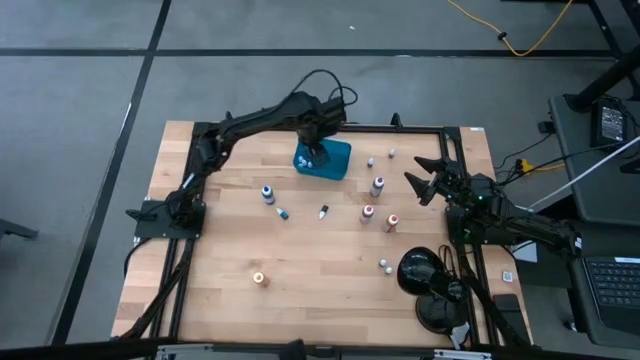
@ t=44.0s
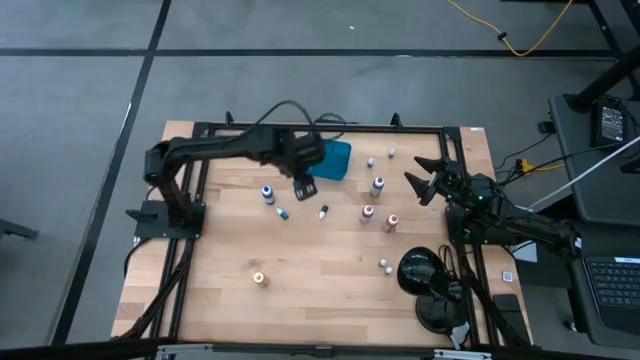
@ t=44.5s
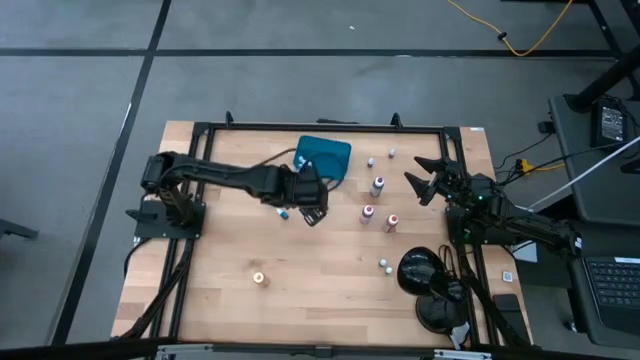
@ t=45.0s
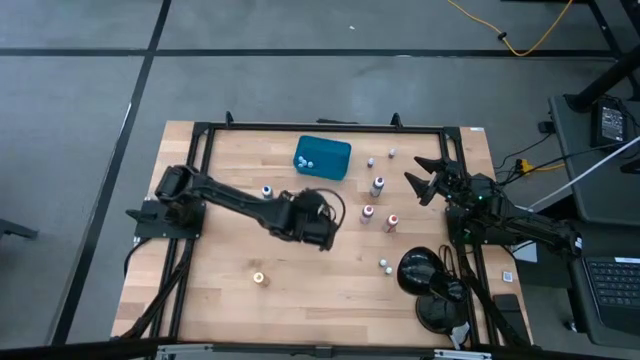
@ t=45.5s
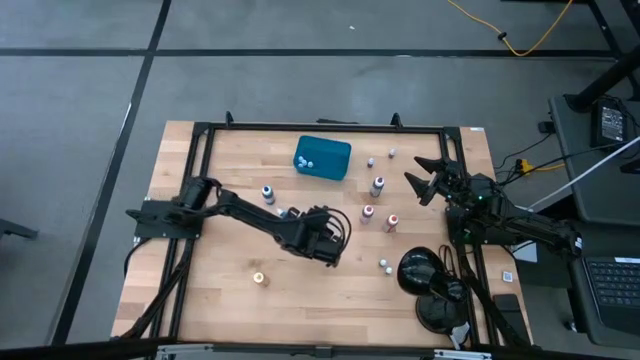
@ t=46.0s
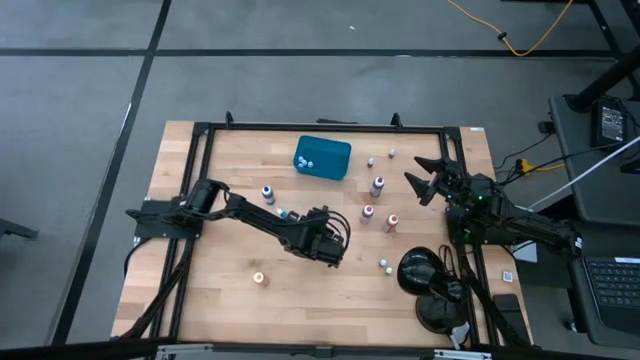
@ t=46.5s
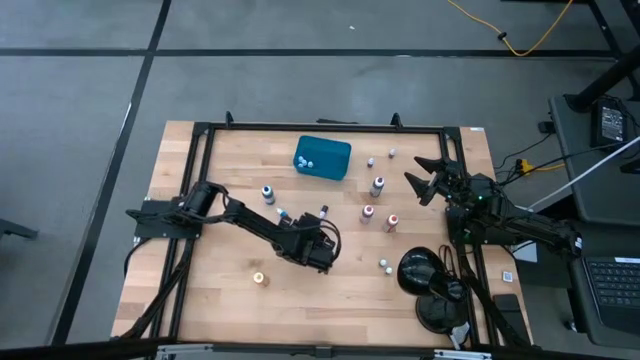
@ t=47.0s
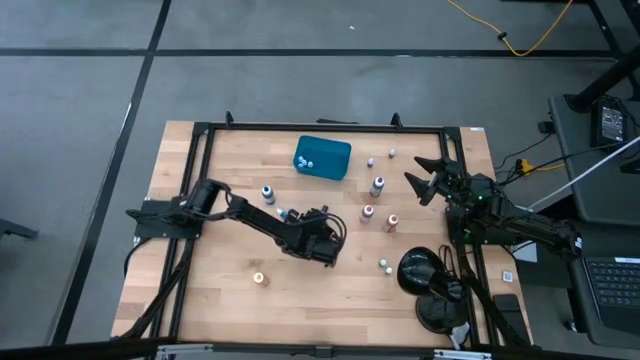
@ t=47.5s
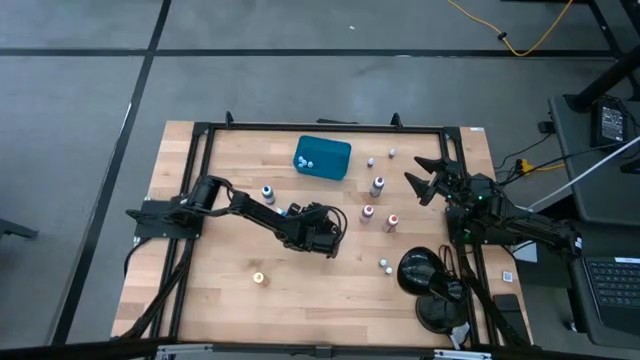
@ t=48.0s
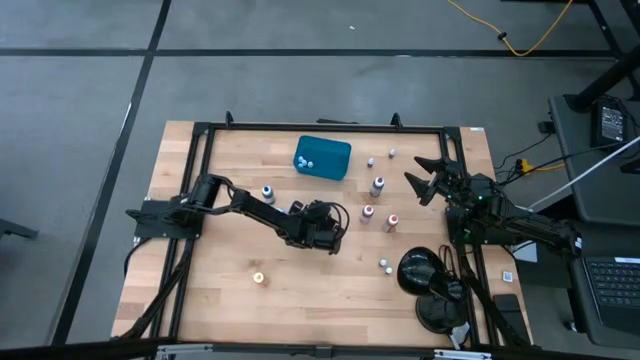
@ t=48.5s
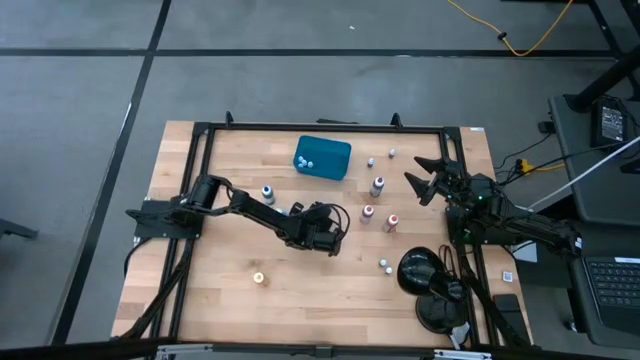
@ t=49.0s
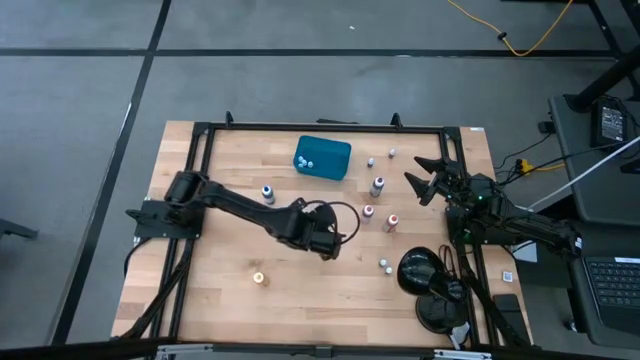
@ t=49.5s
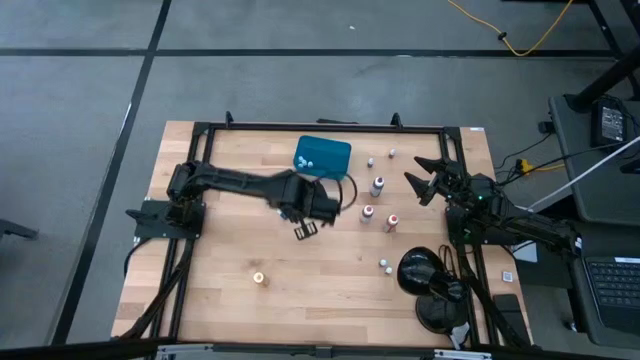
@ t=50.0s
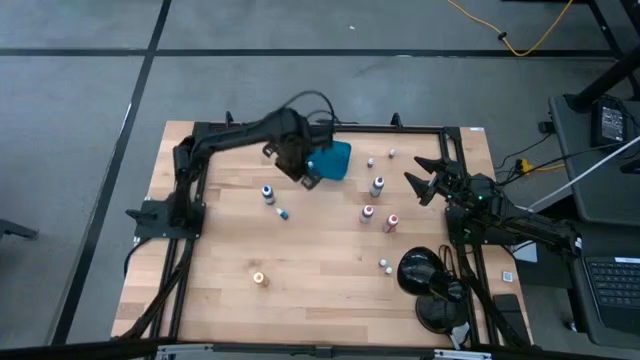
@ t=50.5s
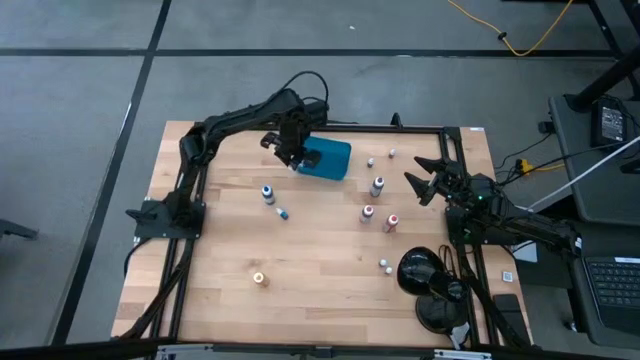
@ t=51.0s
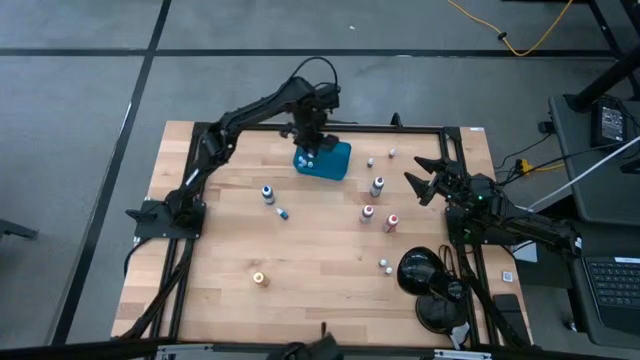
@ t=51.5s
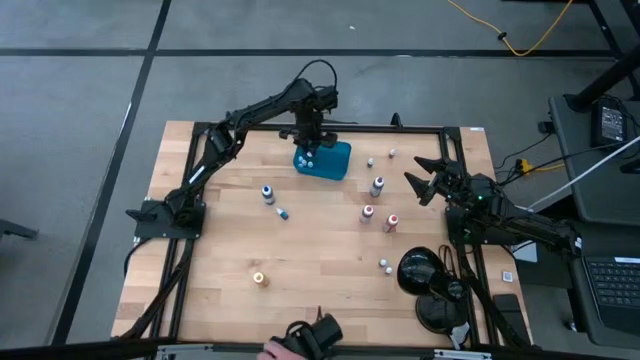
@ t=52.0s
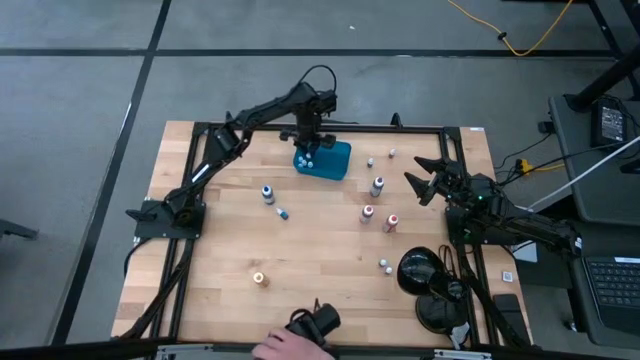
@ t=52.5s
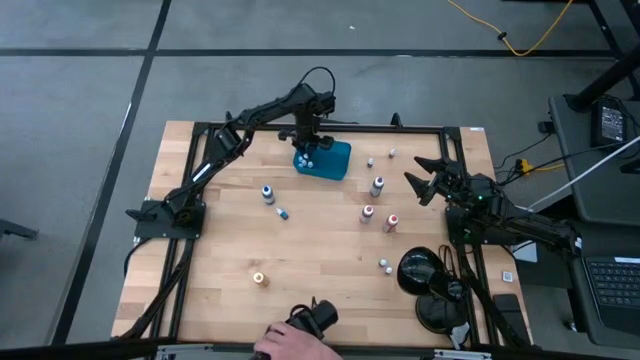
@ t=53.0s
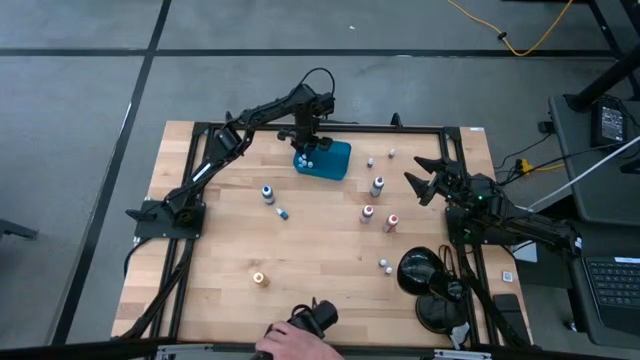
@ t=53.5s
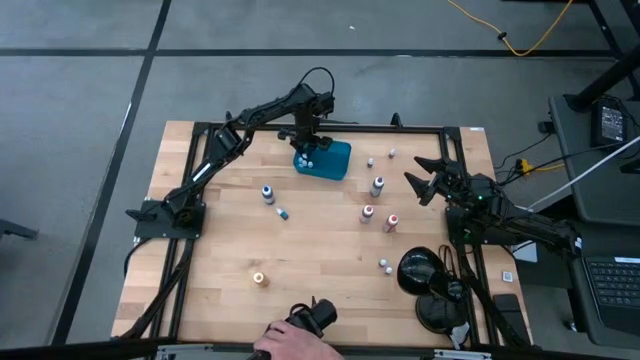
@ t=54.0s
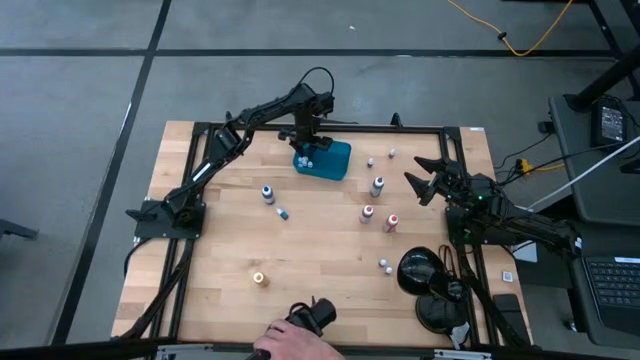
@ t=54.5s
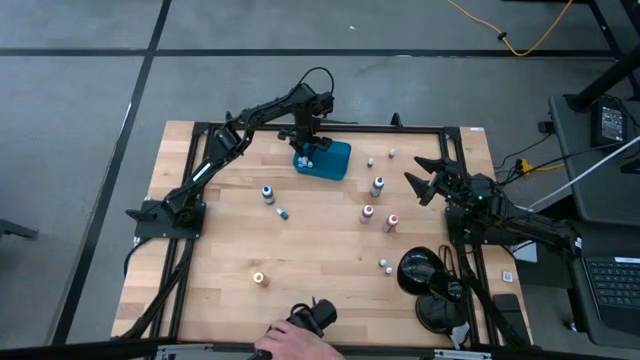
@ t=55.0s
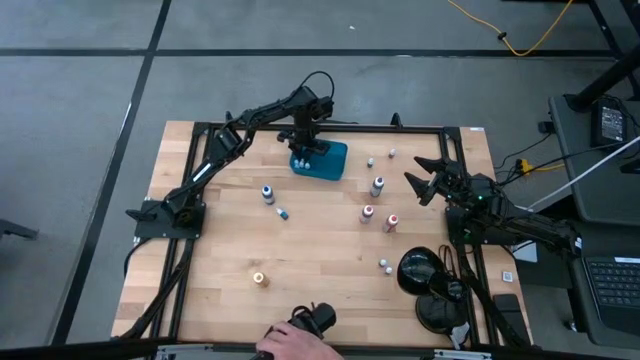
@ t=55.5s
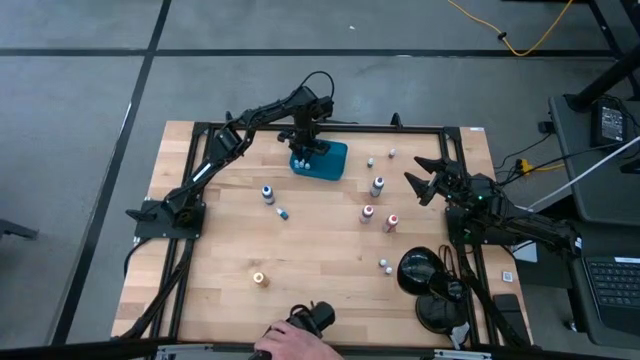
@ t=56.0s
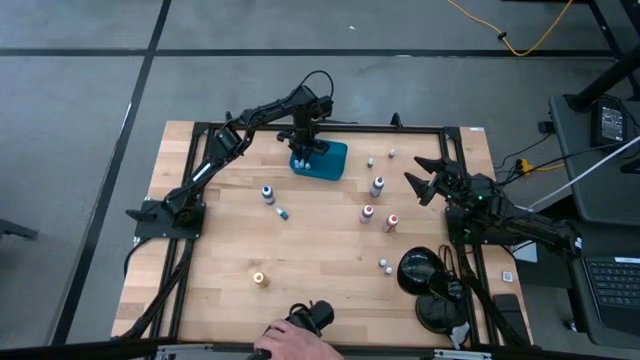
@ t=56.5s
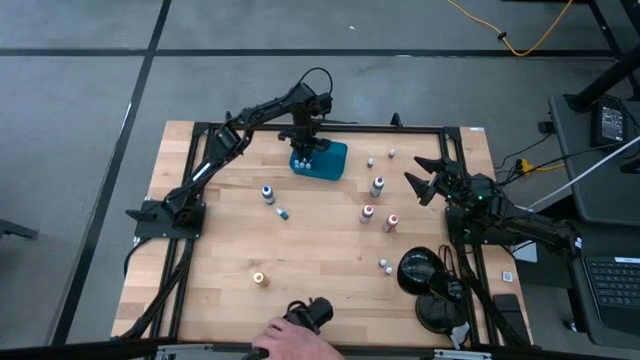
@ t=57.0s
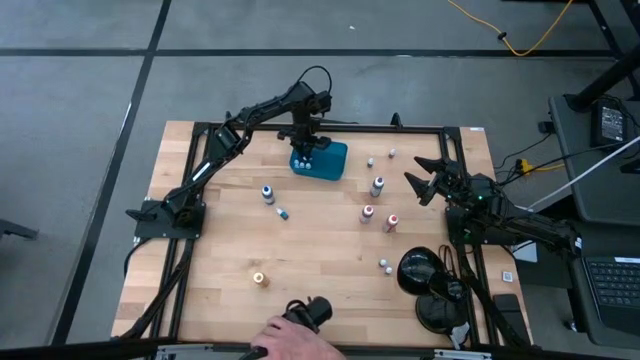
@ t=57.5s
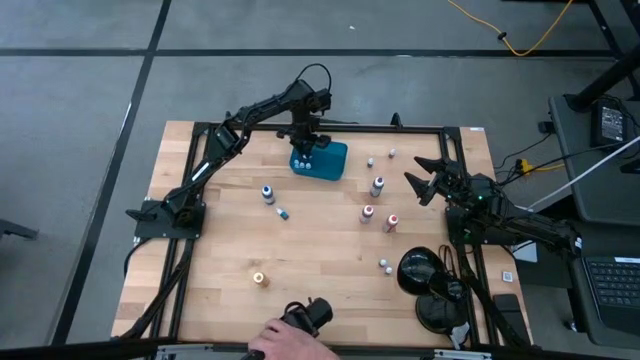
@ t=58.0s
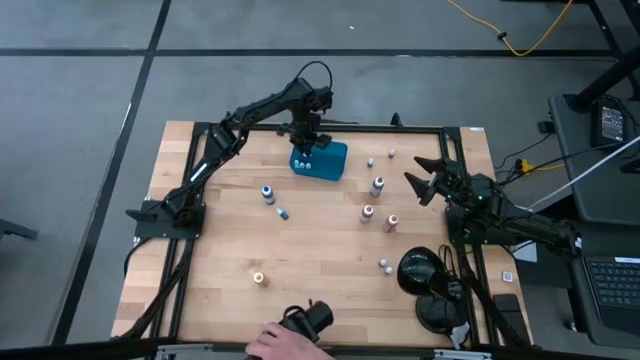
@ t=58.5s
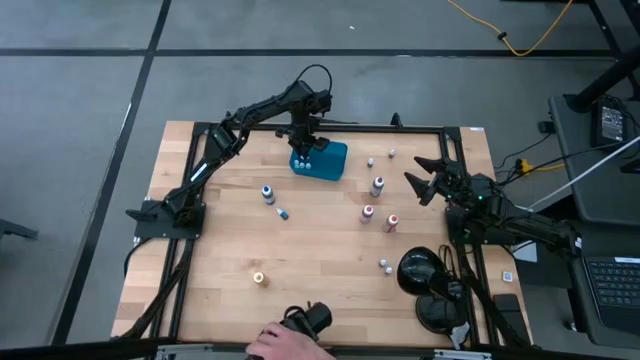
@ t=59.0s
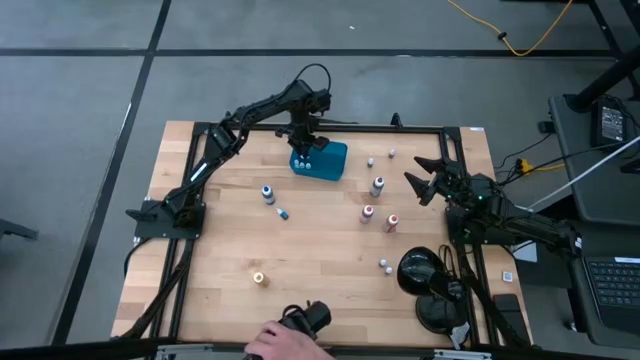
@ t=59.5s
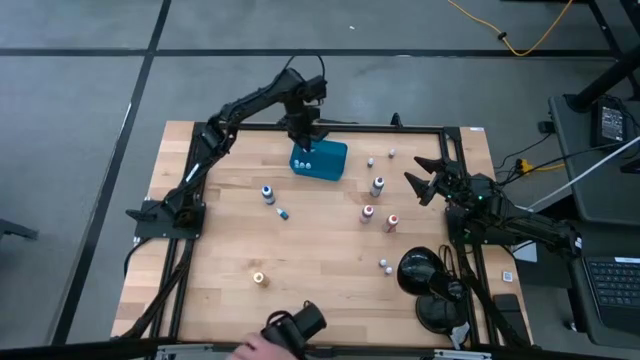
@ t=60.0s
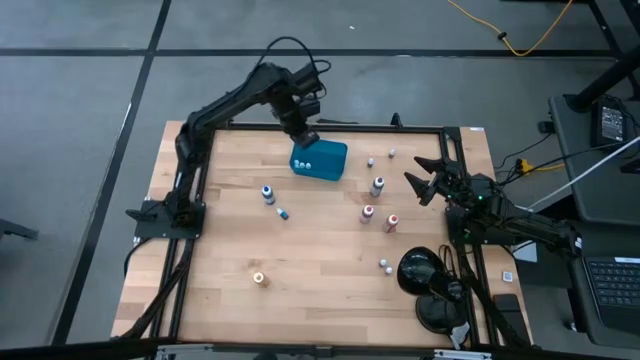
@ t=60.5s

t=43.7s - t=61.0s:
Task: Pick & Place food coloring
Put the small black food coloring bottle into the blue bin

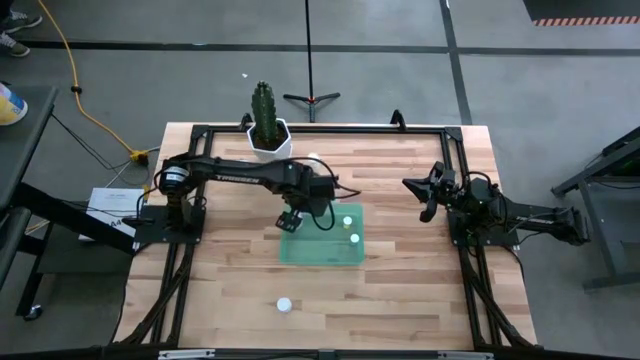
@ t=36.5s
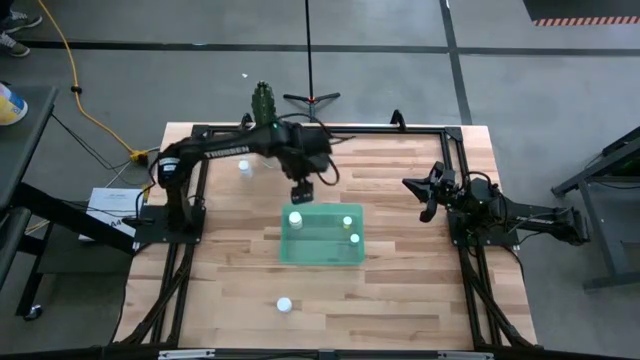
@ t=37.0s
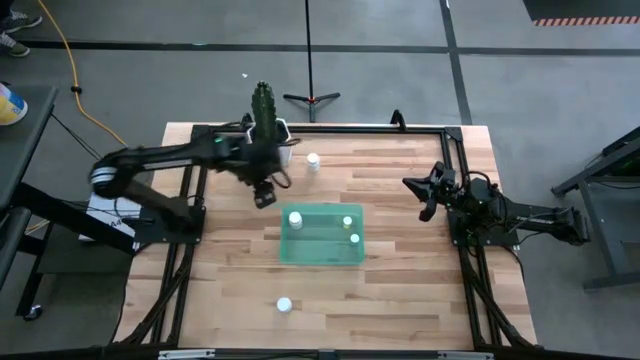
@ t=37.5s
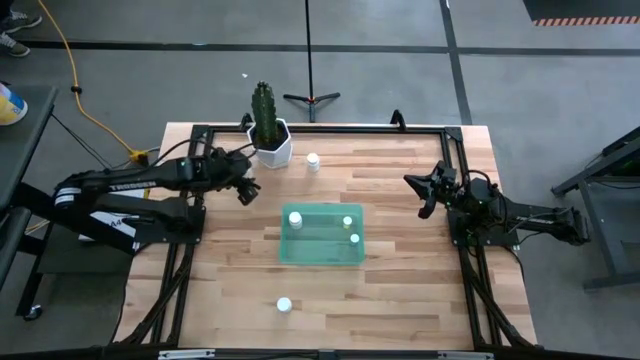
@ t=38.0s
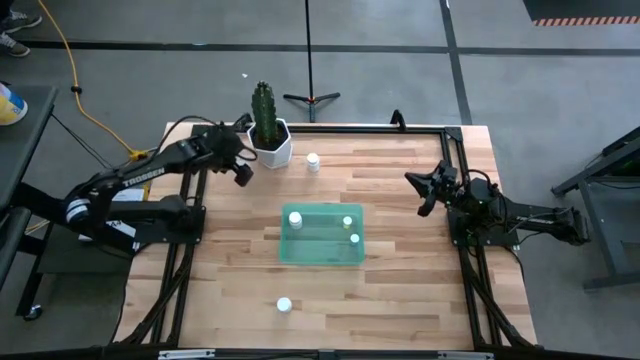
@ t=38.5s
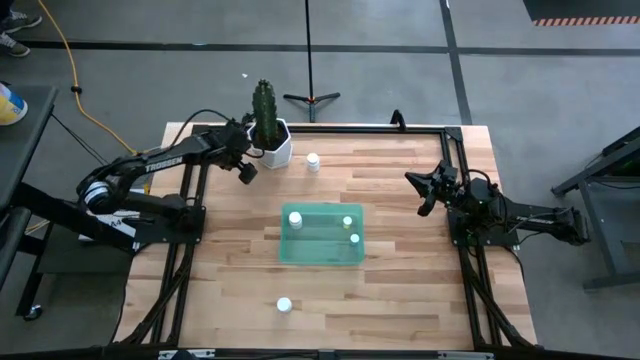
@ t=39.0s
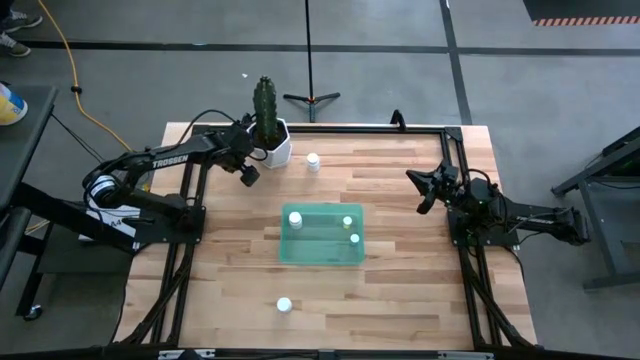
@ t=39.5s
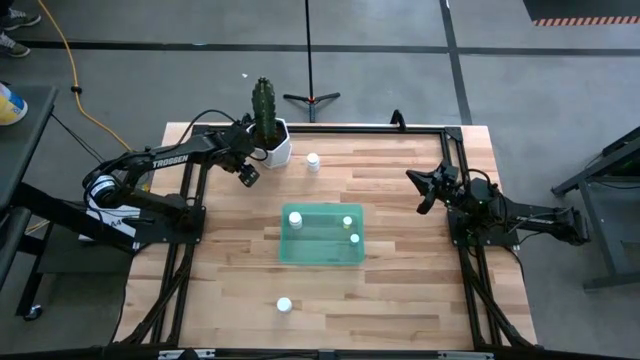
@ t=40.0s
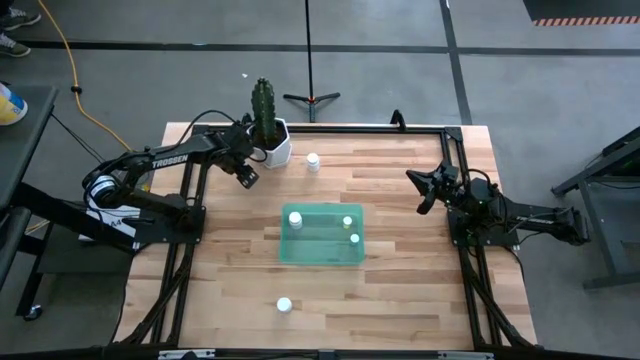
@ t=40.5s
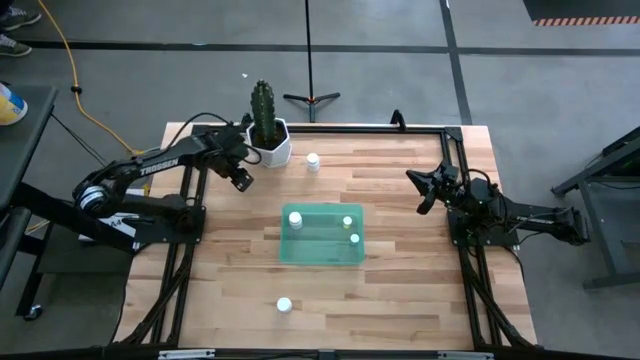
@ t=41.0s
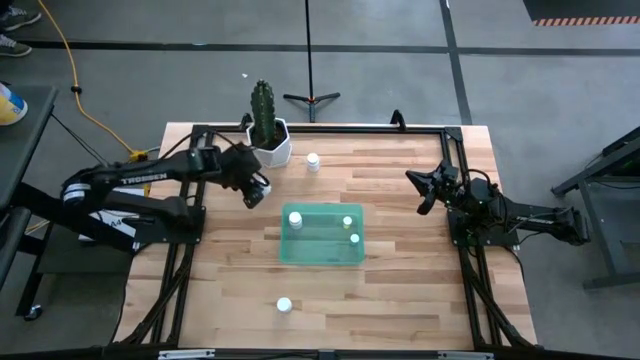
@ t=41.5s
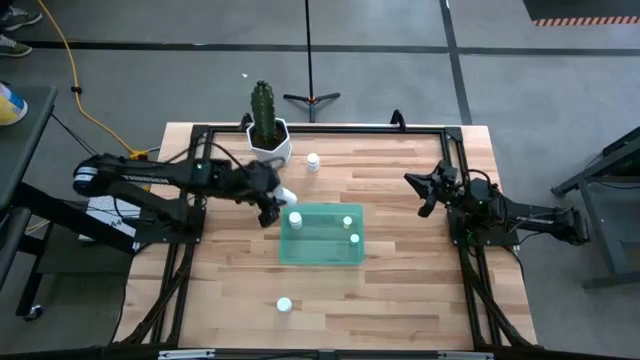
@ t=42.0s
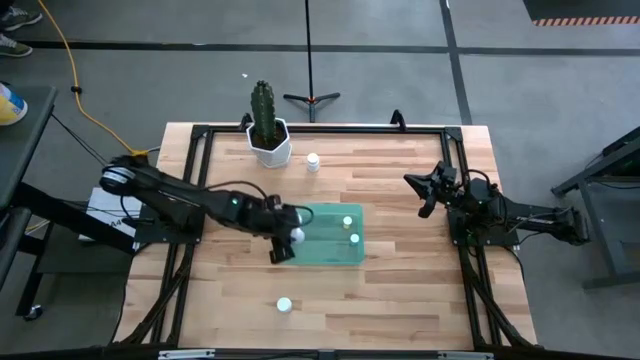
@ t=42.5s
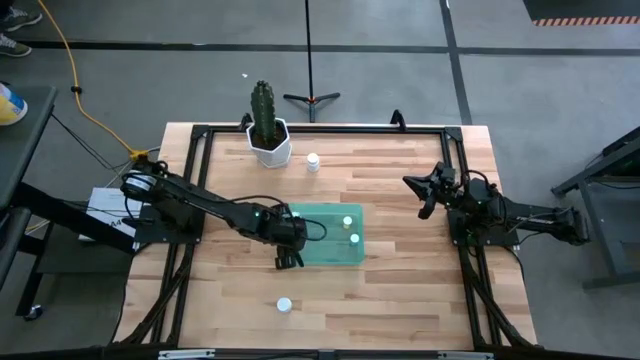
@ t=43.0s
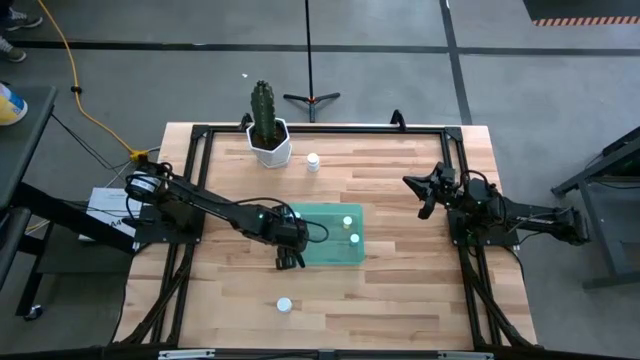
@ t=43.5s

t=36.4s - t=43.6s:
Task: Pick and place pill bottles into a basket
Put the top left white pill bottle into the blue bin
